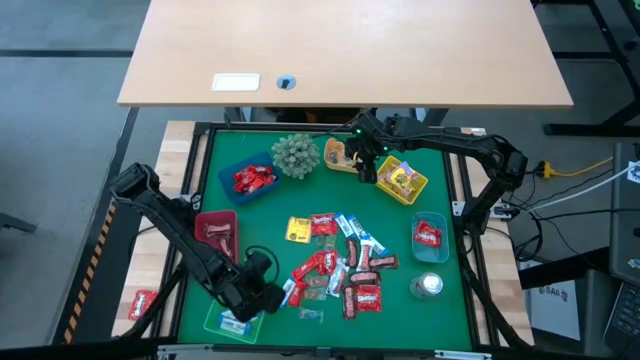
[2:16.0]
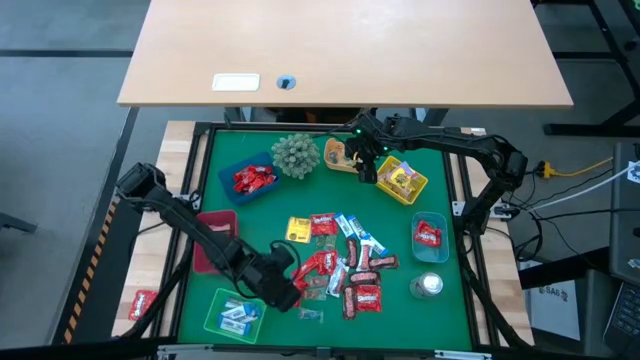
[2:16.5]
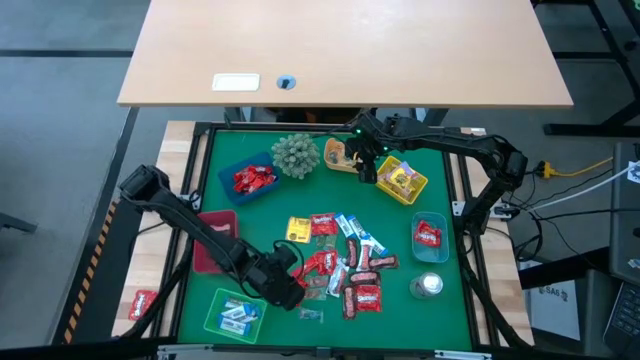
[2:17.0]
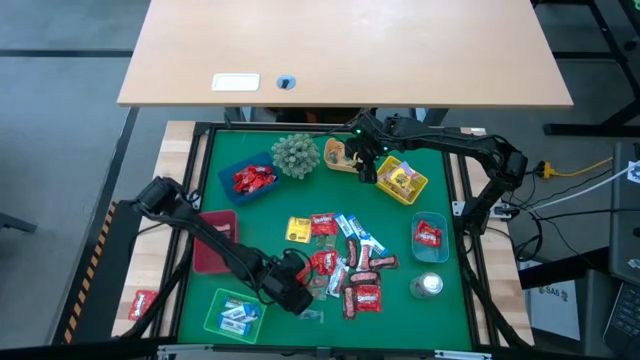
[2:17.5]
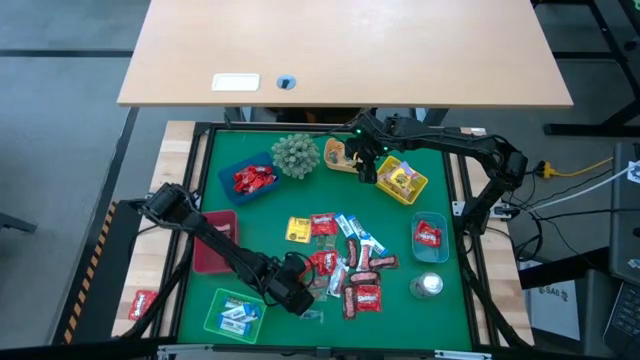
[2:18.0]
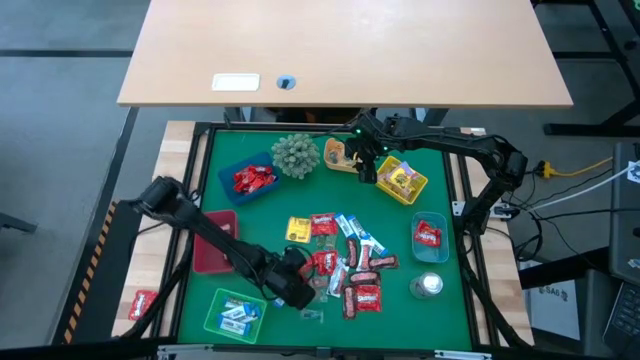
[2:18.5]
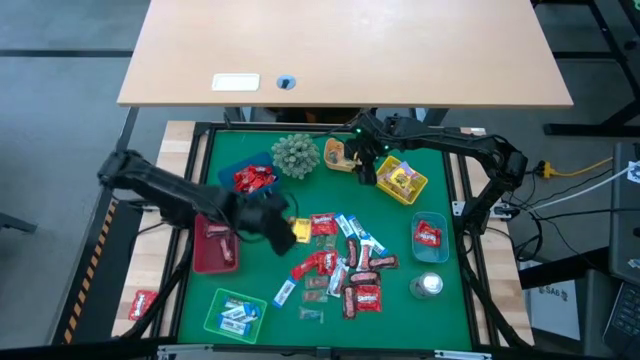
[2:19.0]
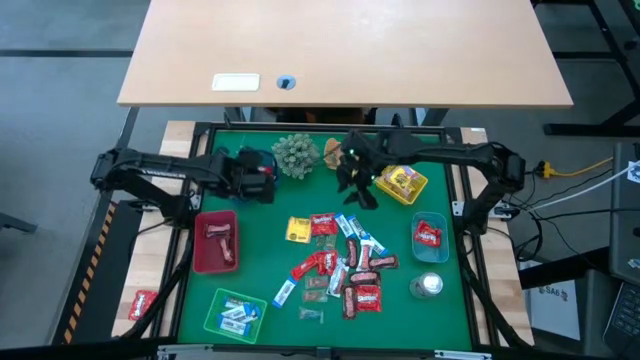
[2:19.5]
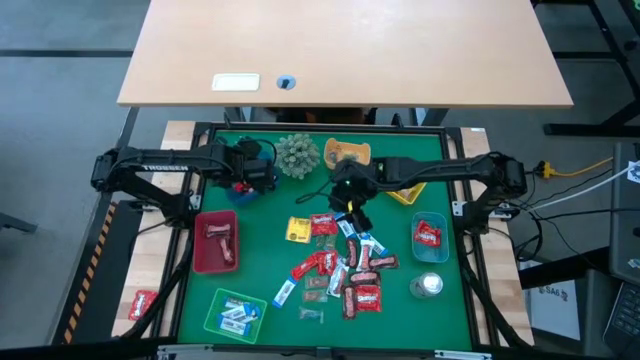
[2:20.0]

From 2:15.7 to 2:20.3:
Task: Sort candy
Put the red chocolate into the blue bin

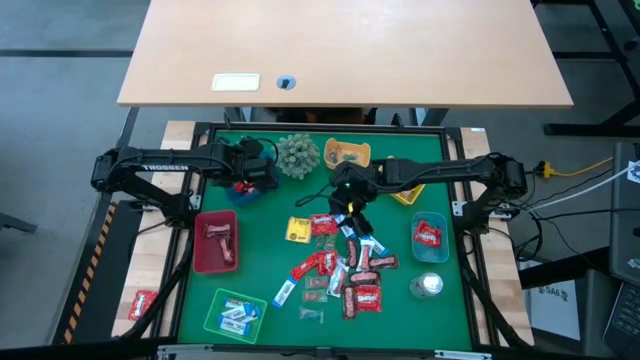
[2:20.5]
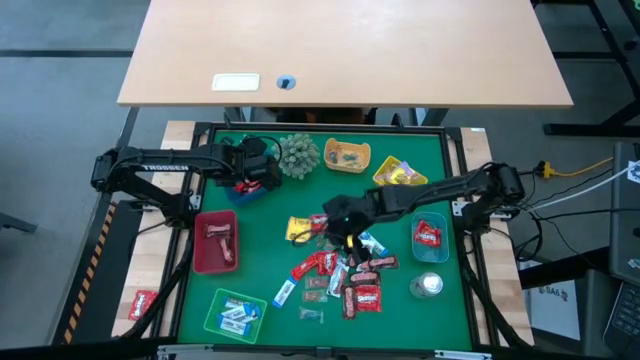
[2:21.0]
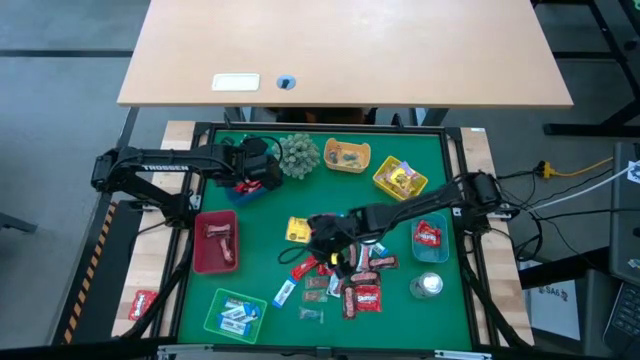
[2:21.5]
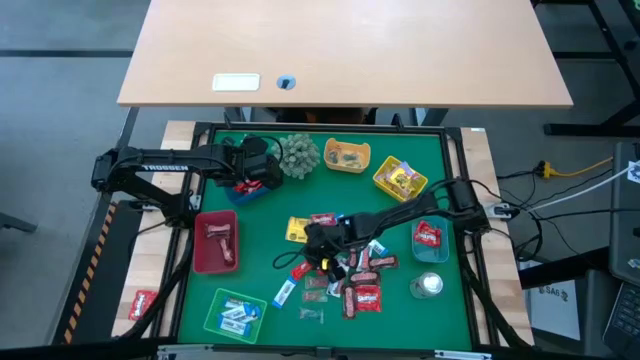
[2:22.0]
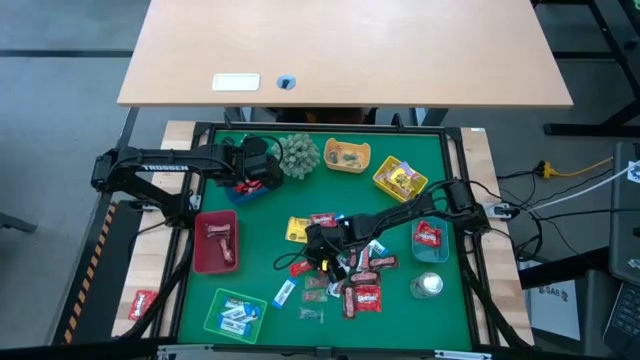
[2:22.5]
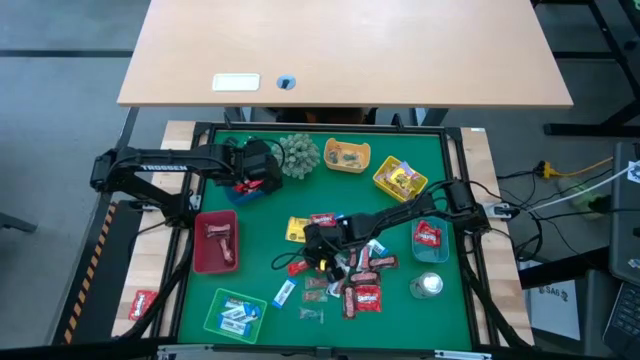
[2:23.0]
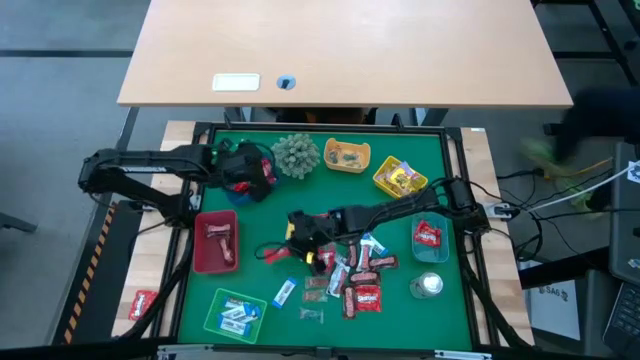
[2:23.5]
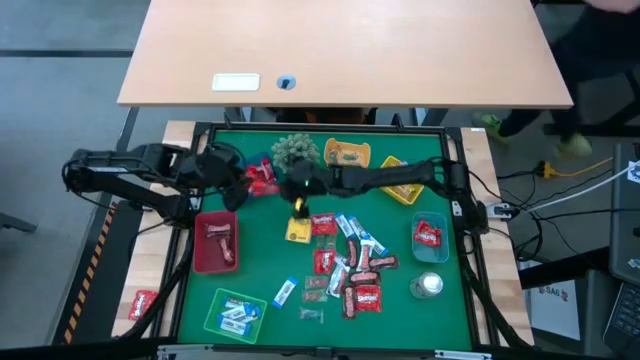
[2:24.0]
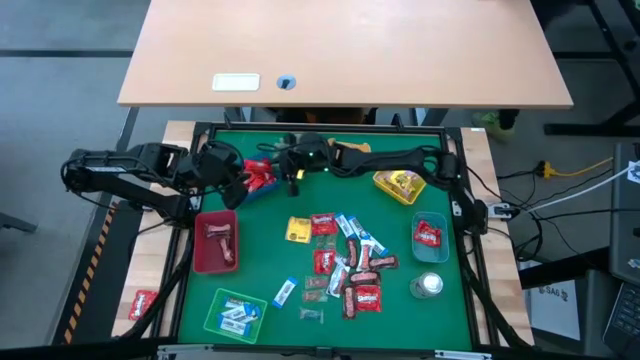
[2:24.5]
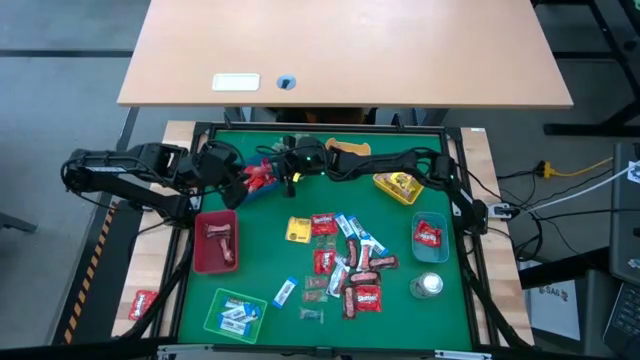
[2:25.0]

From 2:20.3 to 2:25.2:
Put the red chocolate into the blue bin

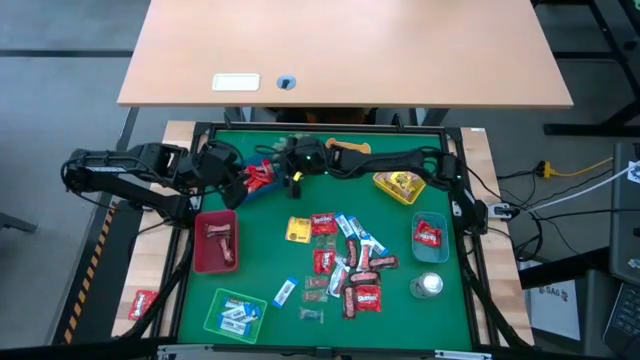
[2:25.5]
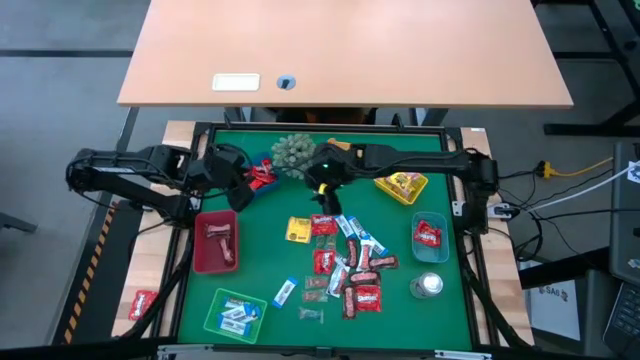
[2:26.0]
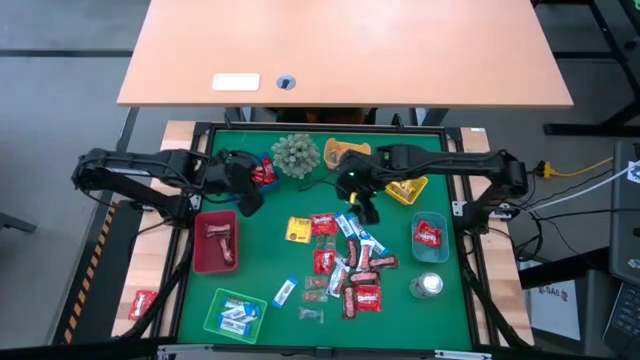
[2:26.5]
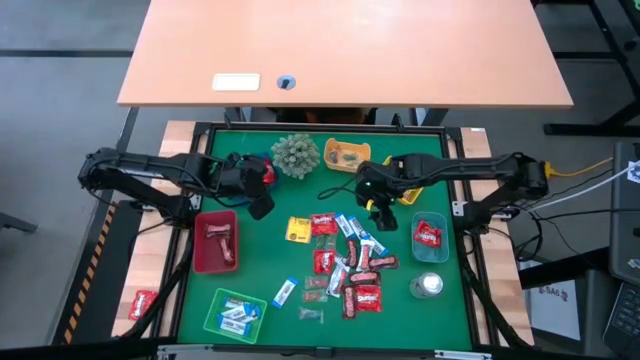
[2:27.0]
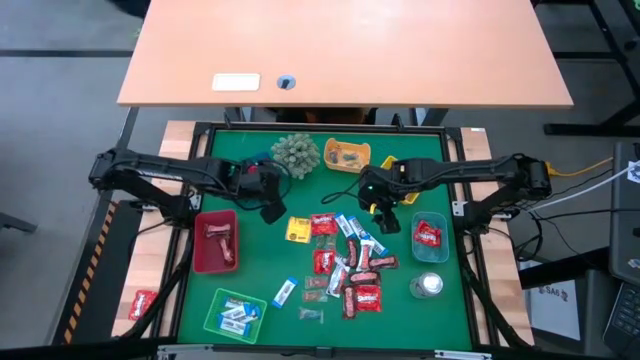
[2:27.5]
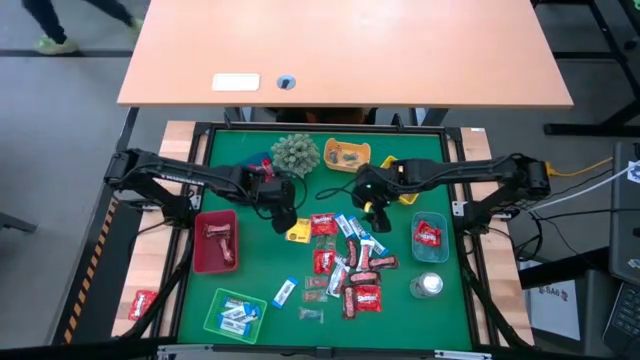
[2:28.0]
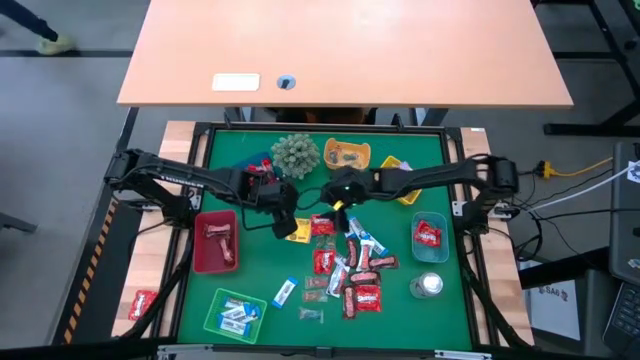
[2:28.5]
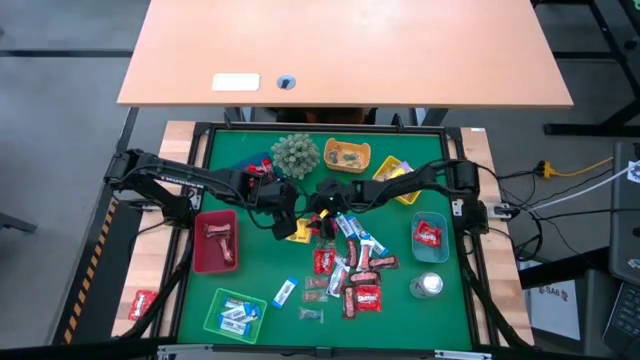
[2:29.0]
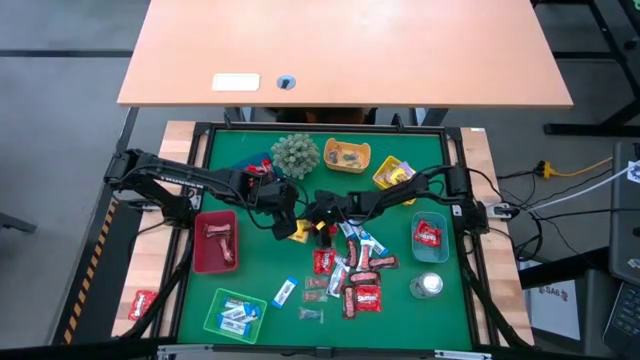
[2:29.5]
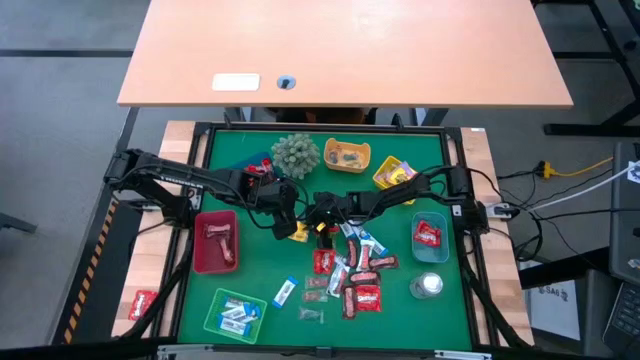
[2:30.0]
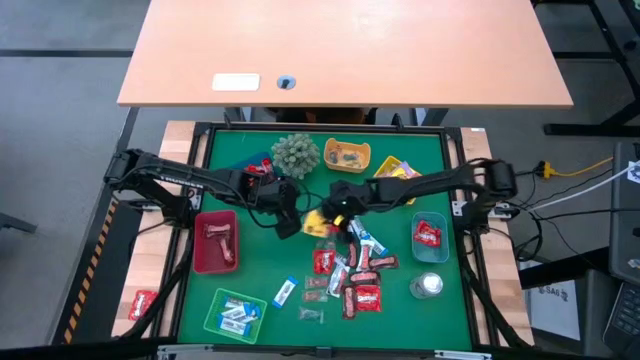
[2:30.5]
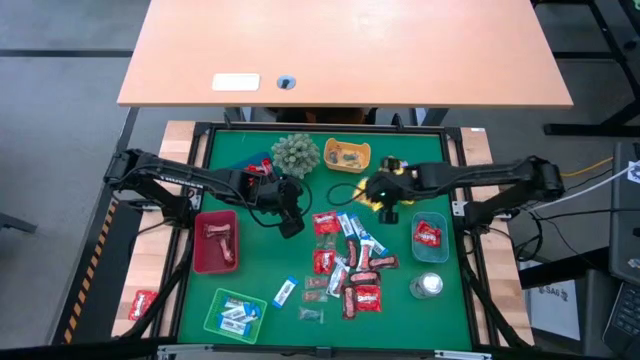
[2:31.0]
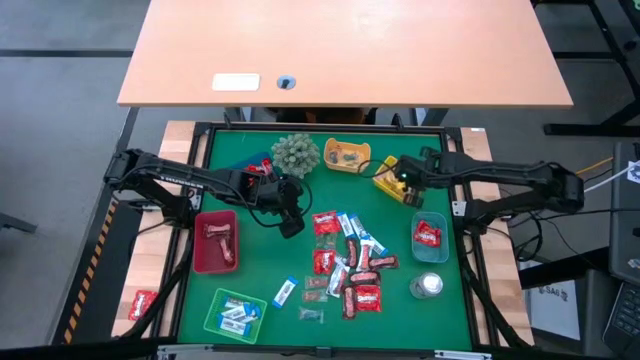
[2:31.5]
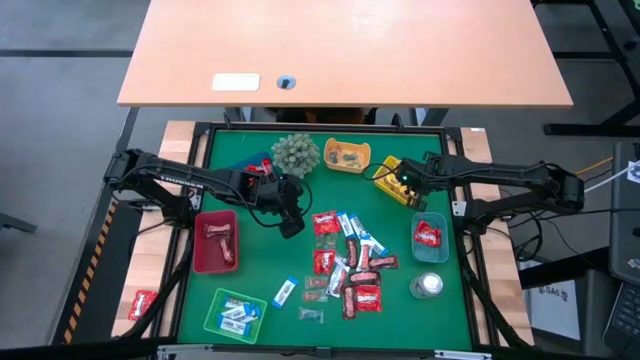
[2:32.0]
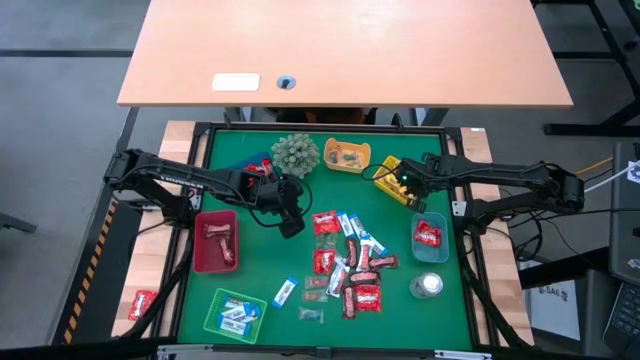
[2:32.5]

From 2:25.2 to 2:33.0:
Put the yellow candy into the yellow bin

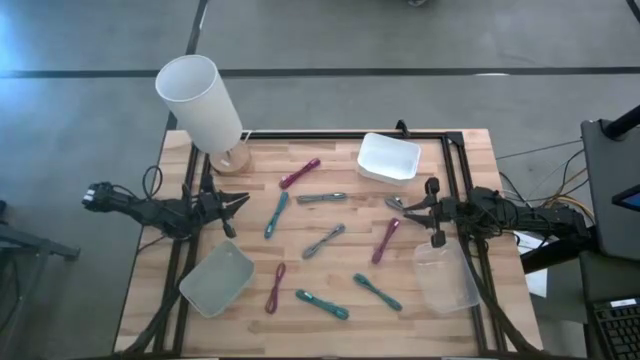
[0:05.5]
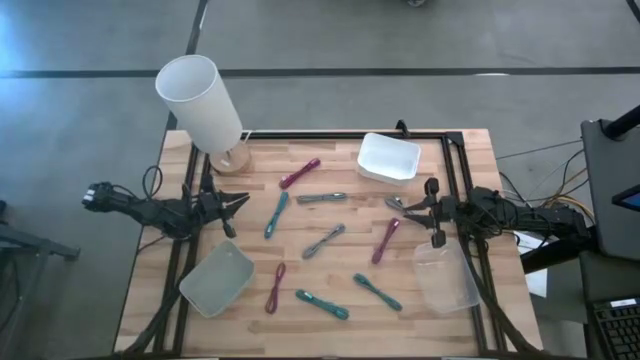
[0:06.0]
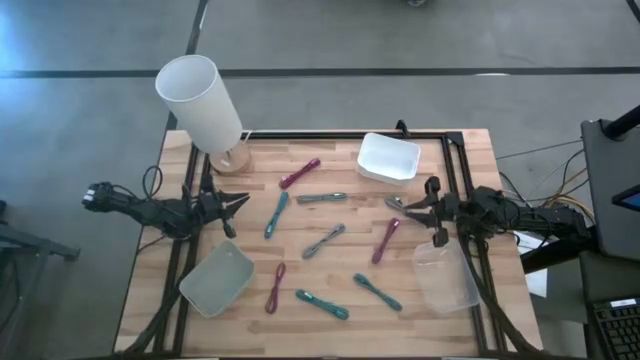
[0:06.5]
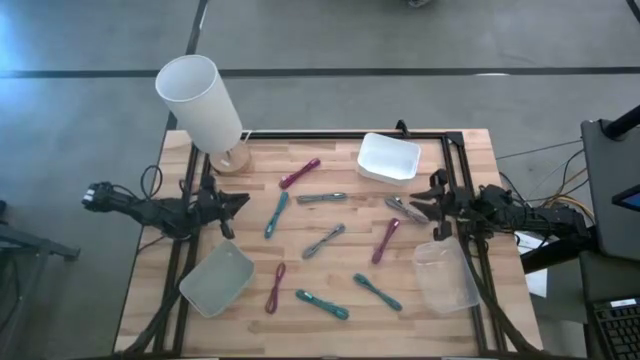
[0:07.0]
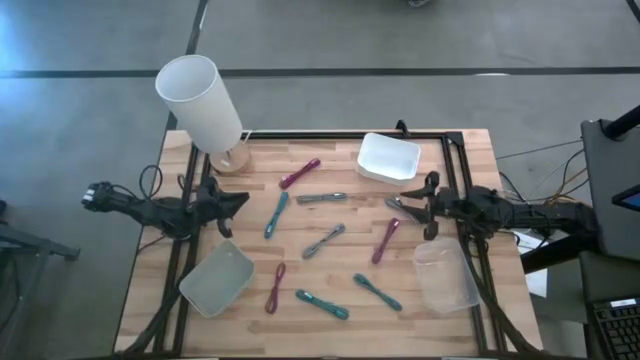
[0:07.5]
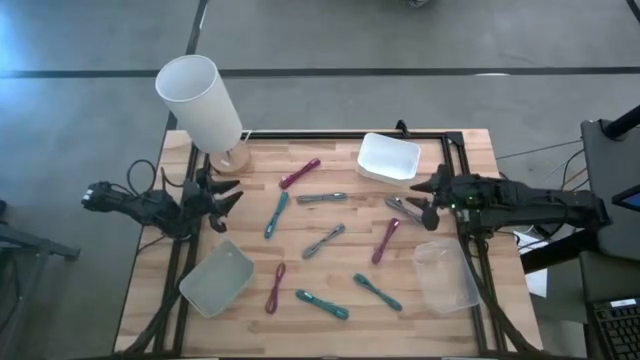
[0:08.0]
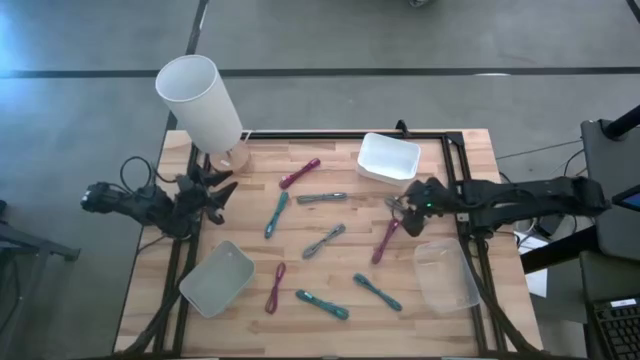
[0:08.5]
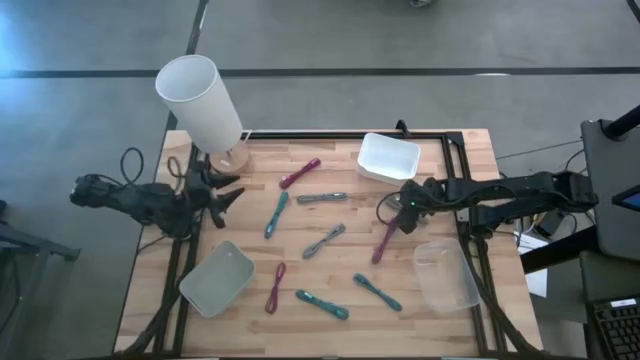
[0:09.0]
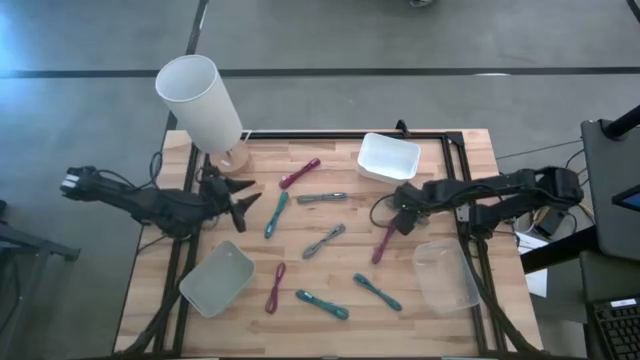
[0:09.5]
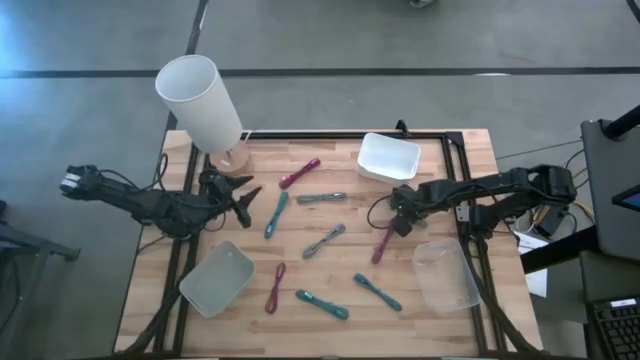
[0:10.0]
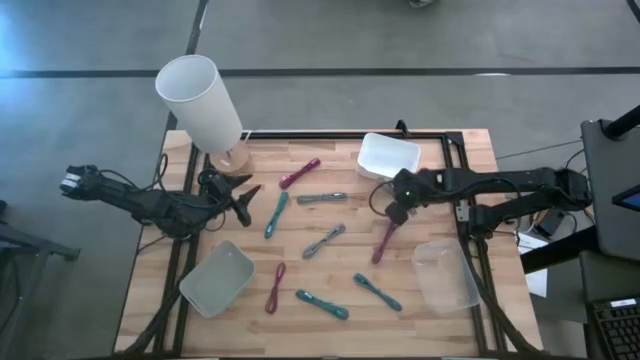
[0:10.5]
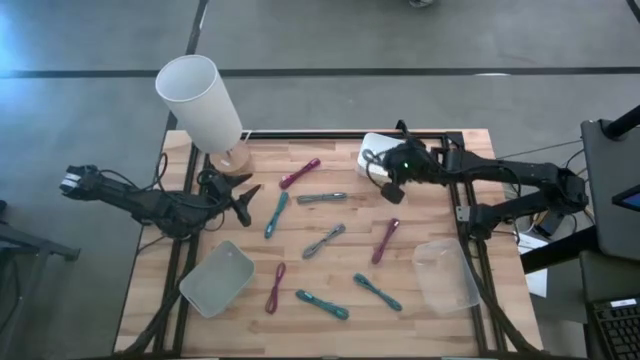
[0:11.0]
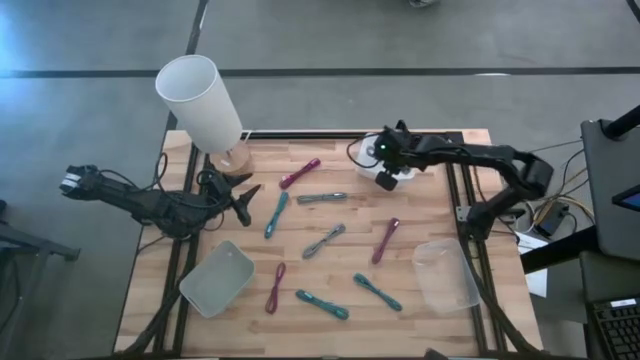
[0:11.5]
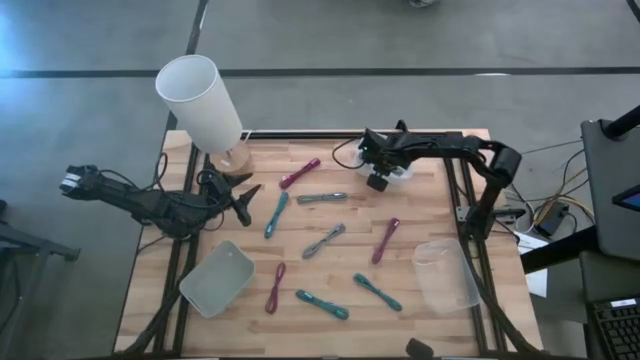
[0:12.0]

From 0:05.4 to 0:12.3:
Task: Pick & Place USB Port
Put the top right white patterned charger cable into the white bin
